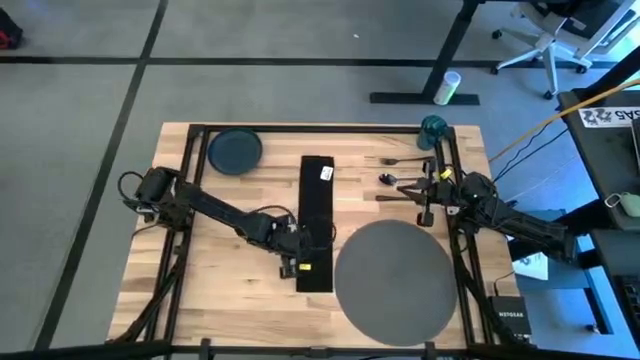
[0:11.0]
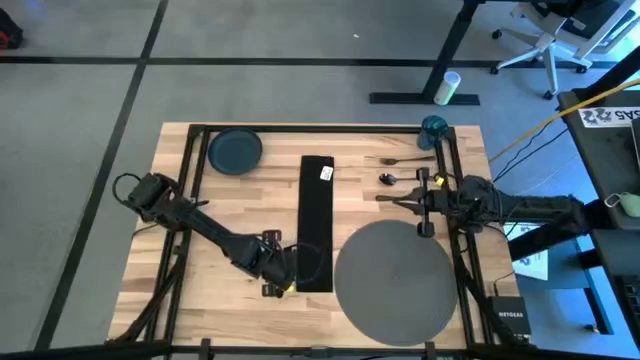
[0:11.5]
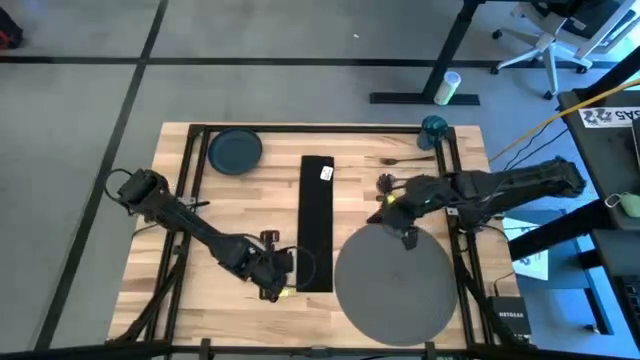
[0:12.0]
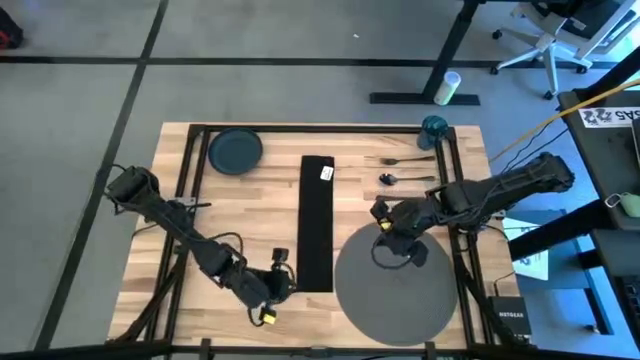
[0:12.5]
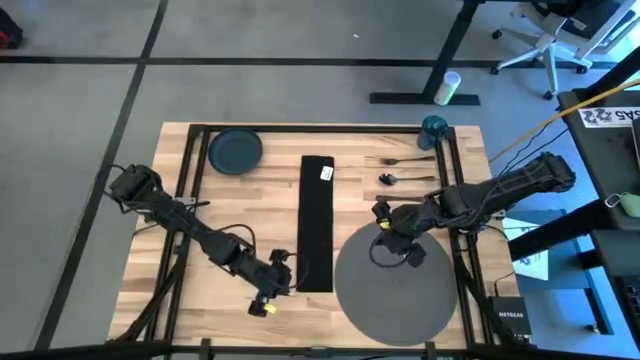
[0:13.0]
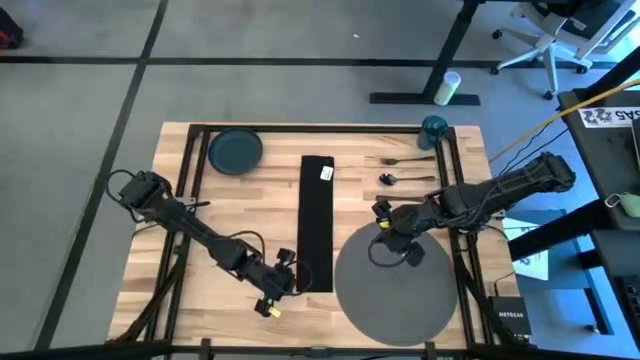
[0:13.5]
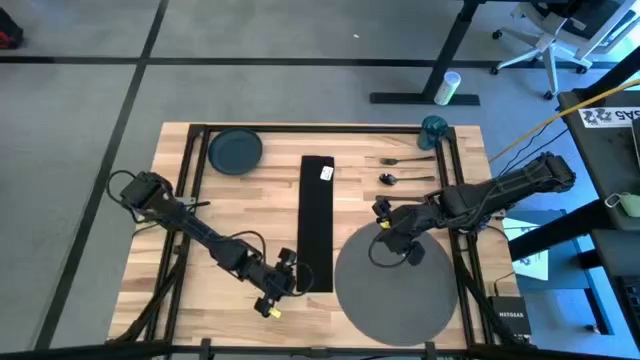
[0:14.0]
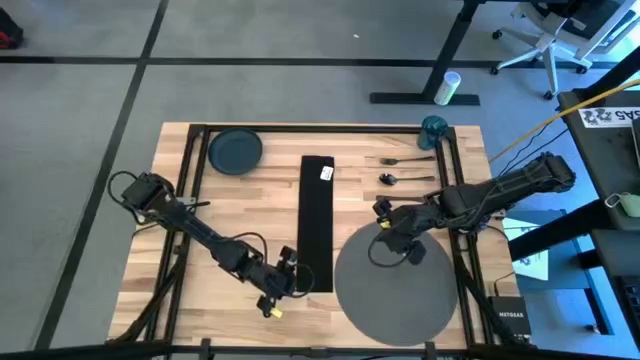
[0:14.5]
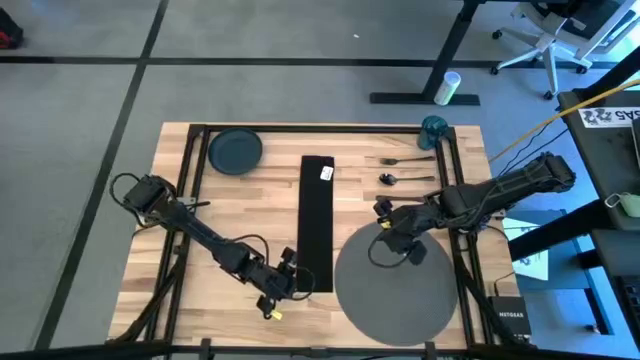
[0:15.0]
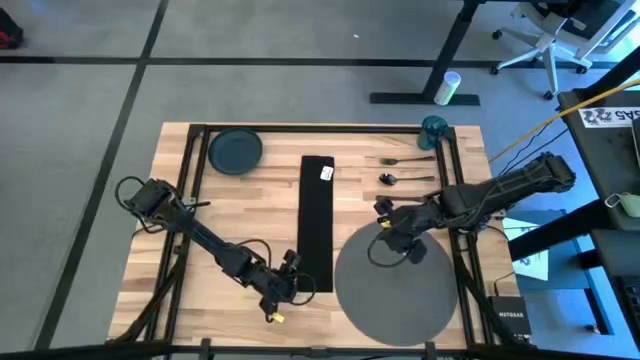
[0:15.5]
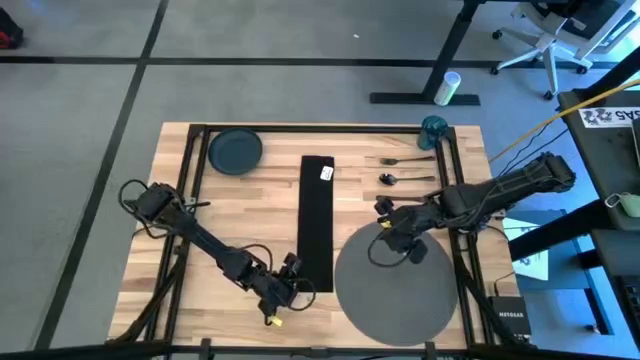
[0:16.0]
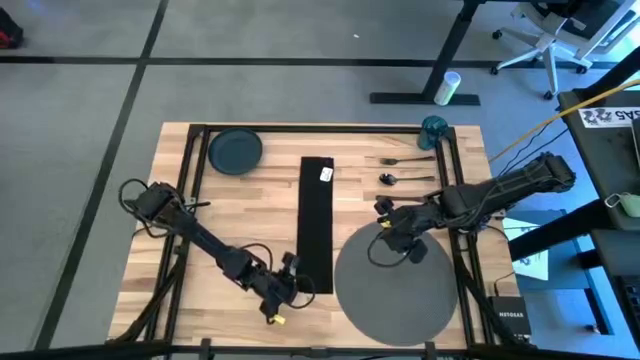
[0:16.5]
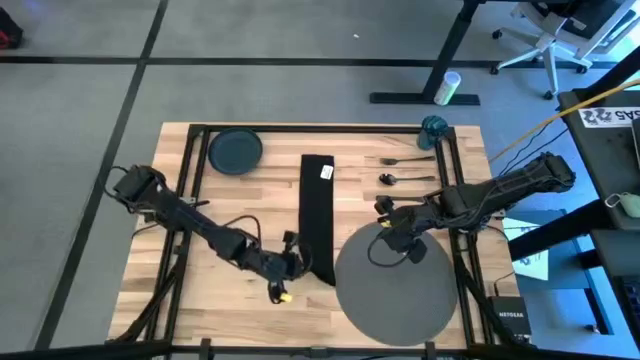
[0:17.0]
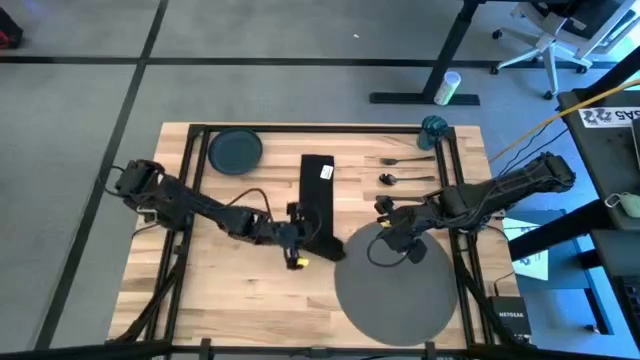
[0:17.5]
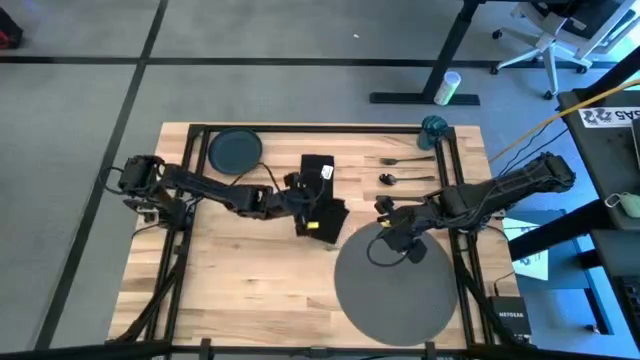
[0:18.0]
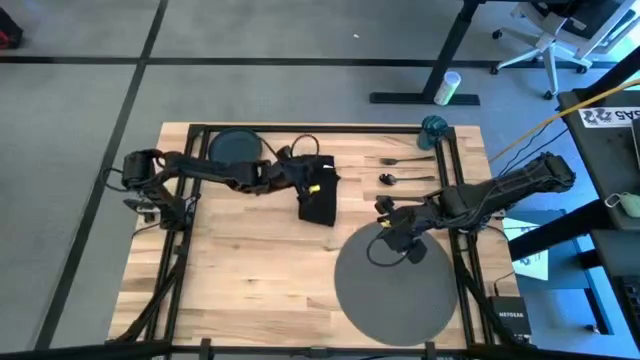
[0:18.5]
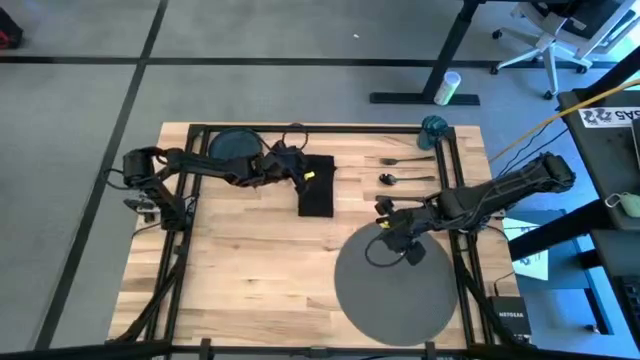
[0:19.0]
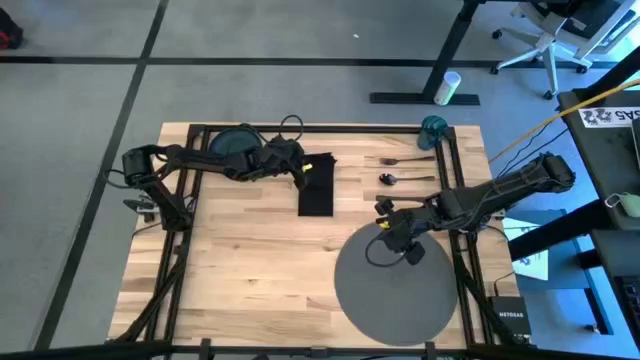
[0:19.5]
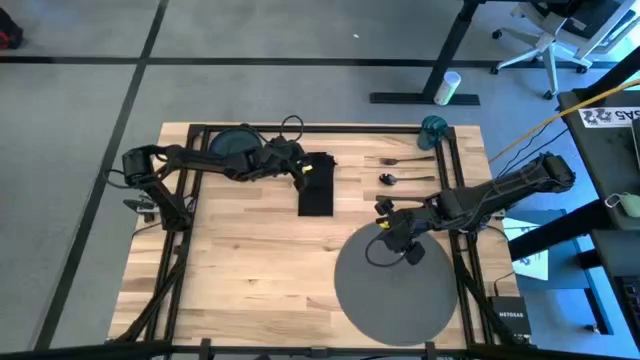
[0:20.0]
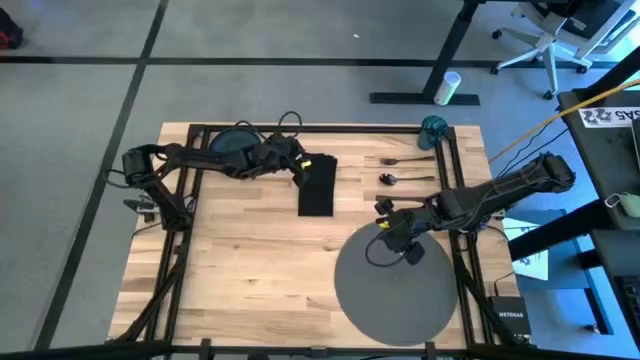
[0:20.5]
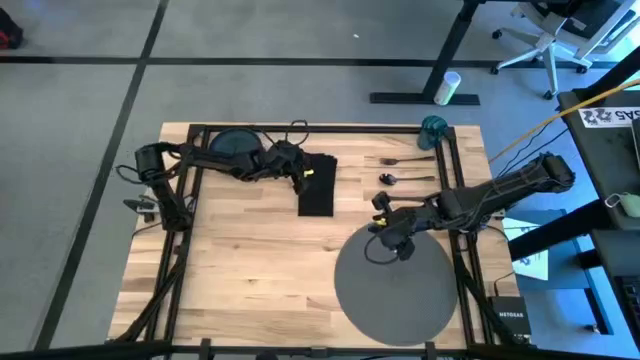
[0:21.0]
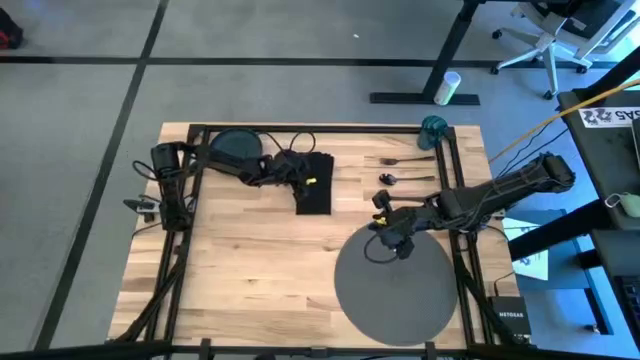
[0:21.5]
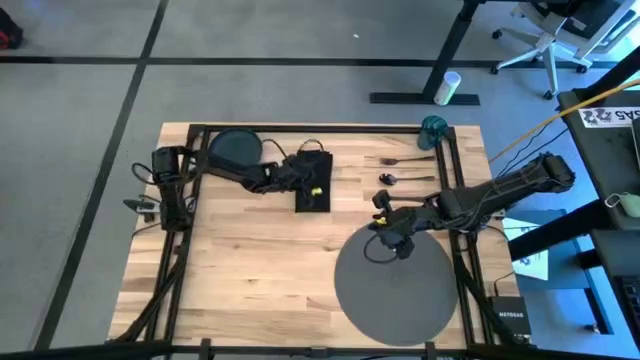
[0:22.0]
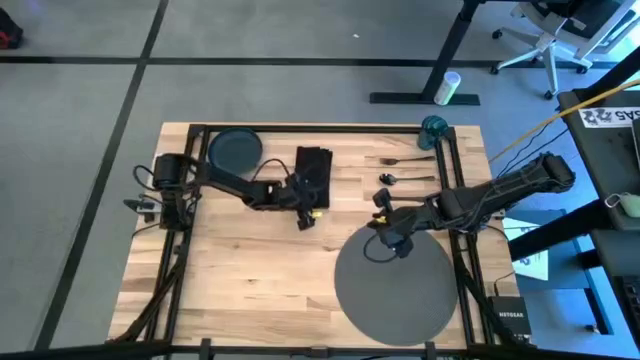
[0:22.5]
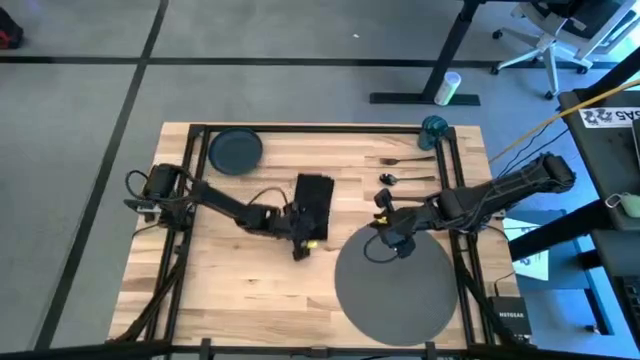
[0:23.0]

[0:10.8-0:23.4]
Task: Set table place
Fold the black table napkin
